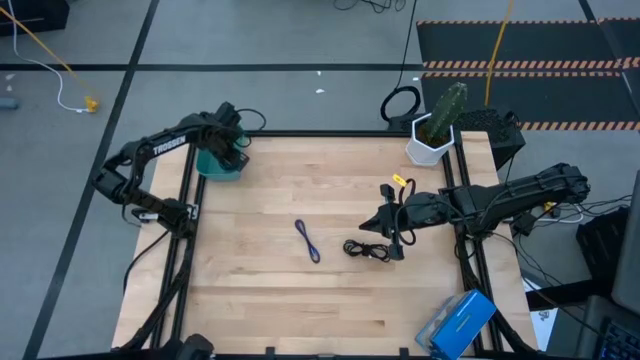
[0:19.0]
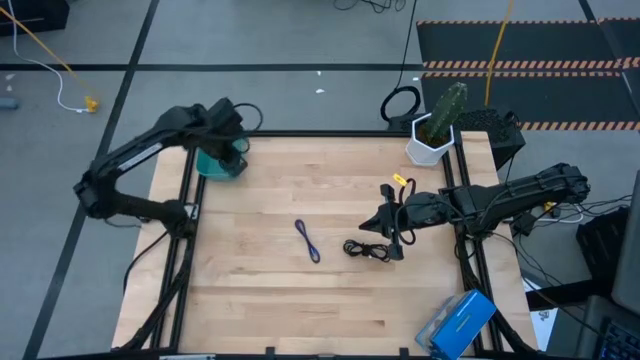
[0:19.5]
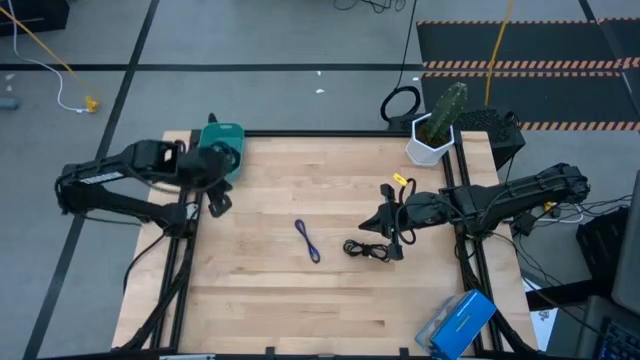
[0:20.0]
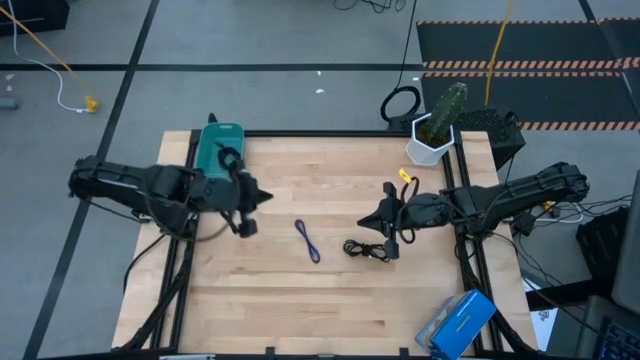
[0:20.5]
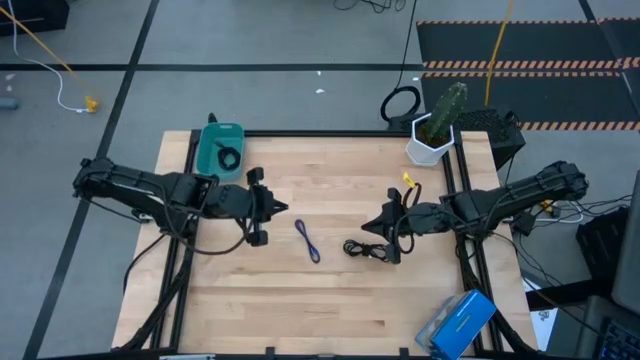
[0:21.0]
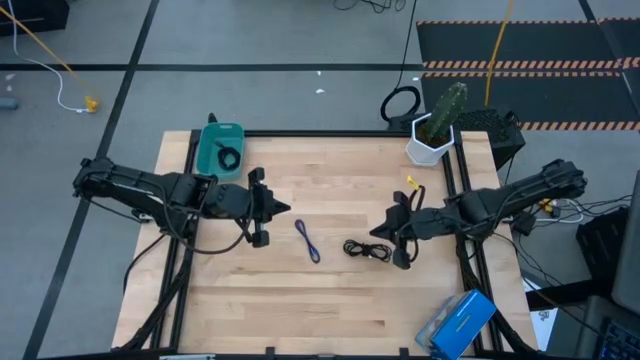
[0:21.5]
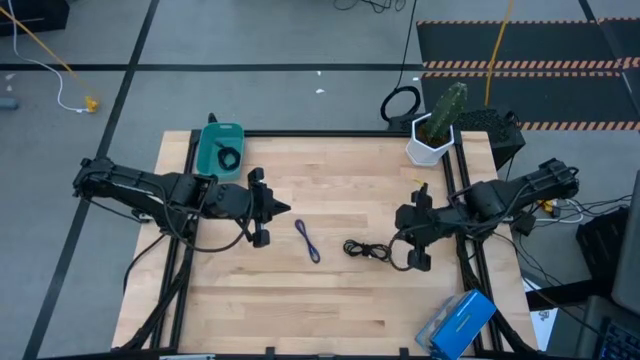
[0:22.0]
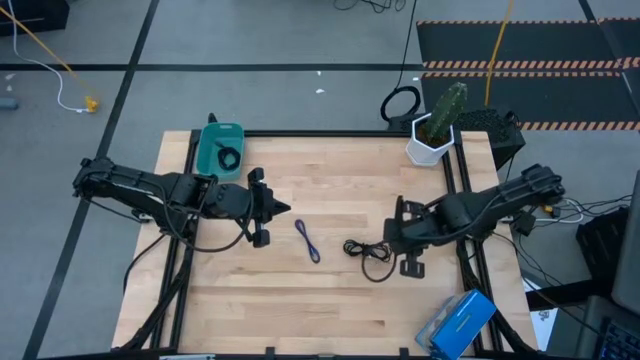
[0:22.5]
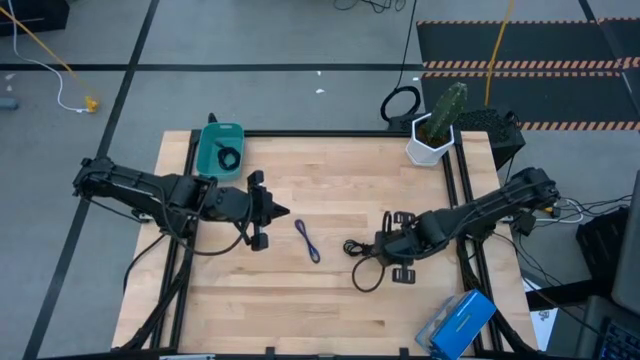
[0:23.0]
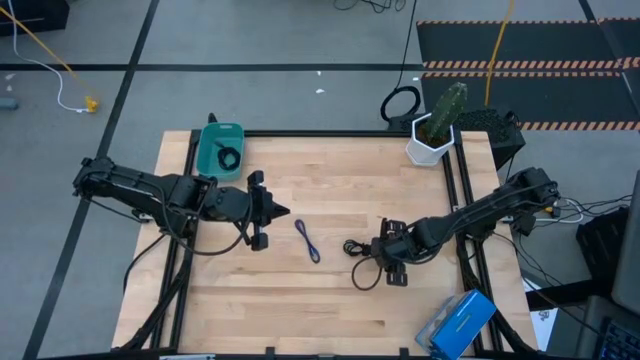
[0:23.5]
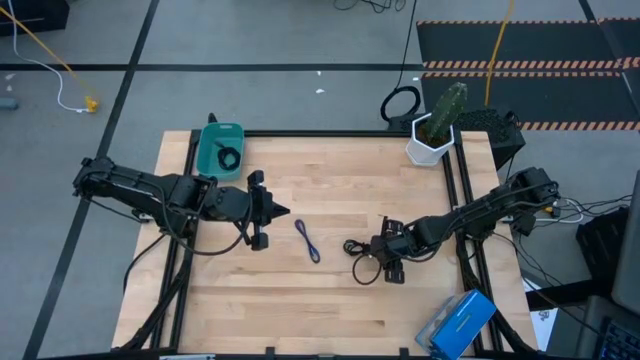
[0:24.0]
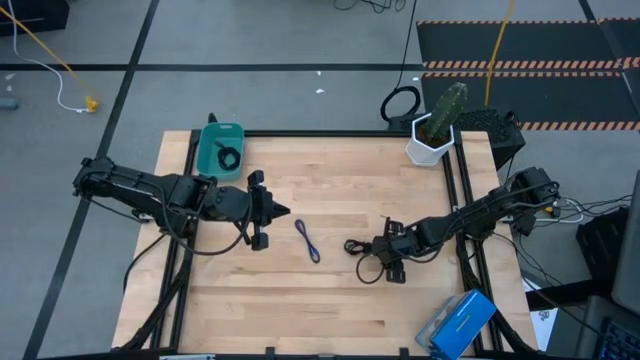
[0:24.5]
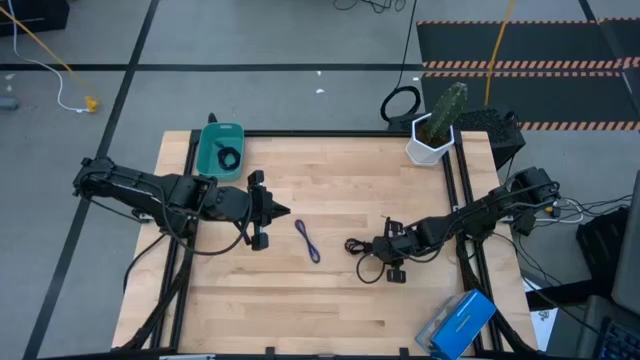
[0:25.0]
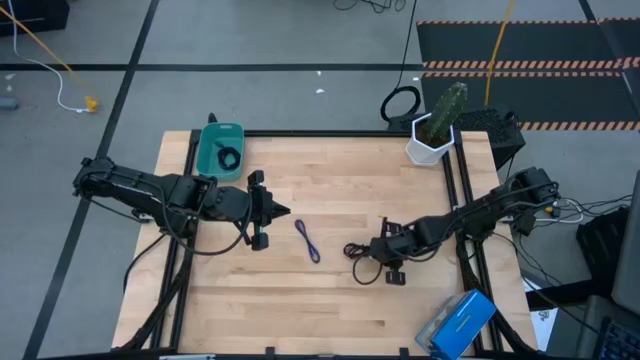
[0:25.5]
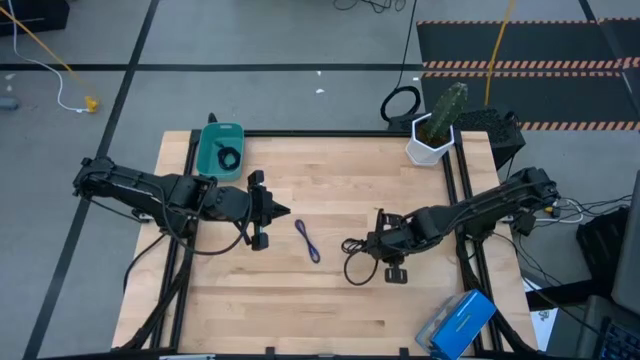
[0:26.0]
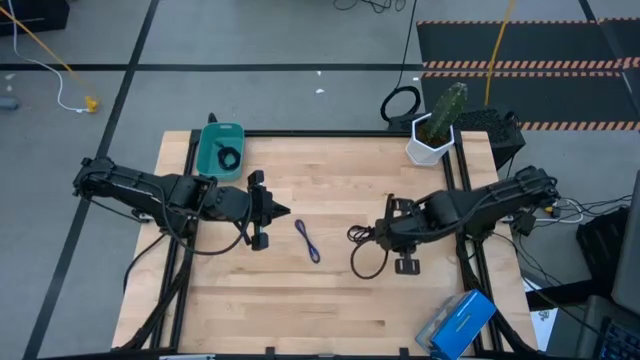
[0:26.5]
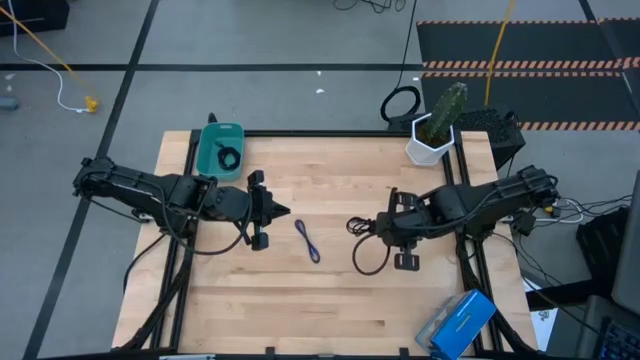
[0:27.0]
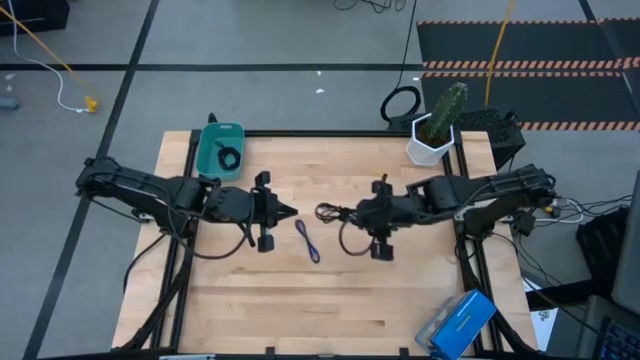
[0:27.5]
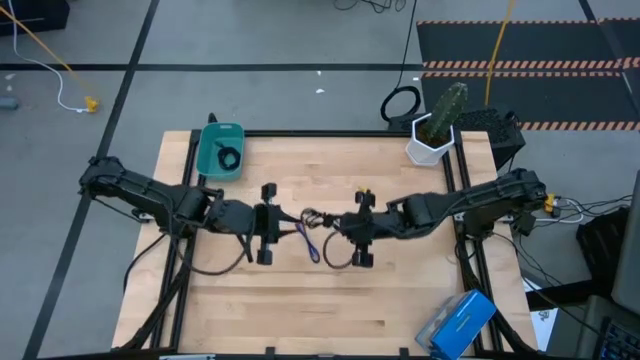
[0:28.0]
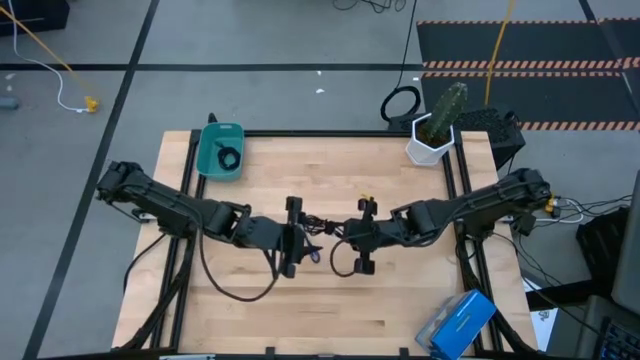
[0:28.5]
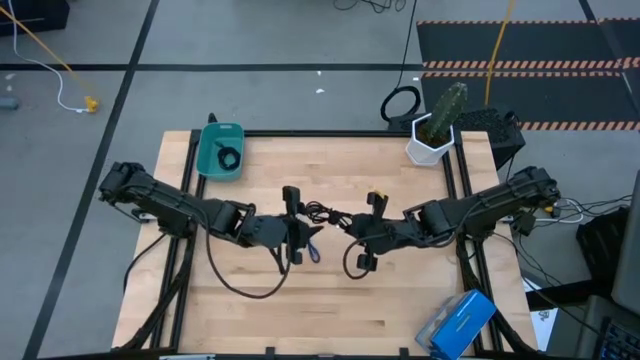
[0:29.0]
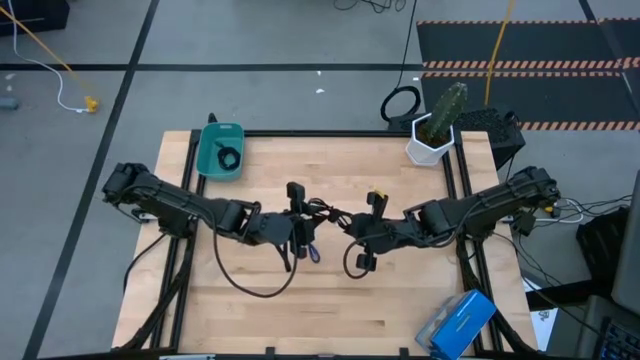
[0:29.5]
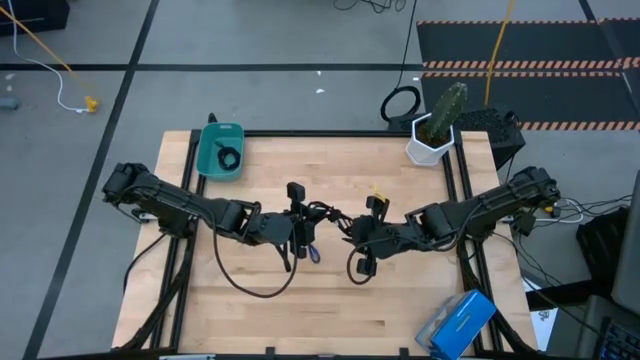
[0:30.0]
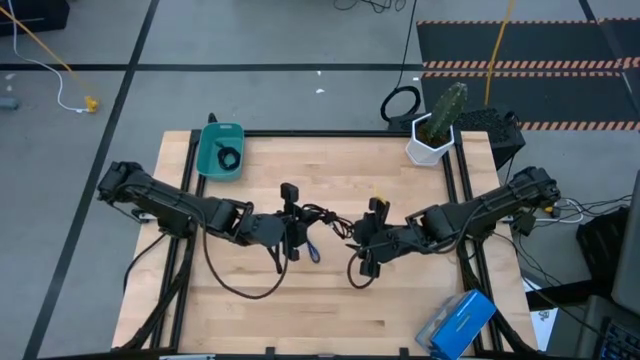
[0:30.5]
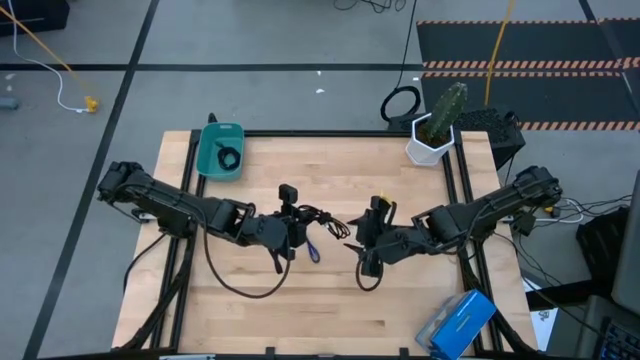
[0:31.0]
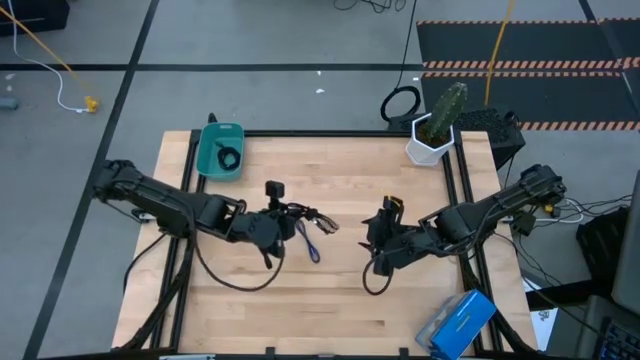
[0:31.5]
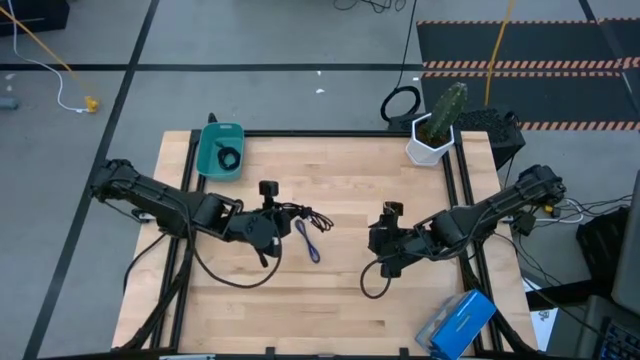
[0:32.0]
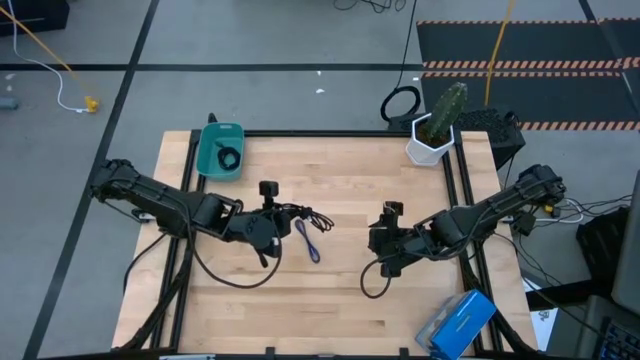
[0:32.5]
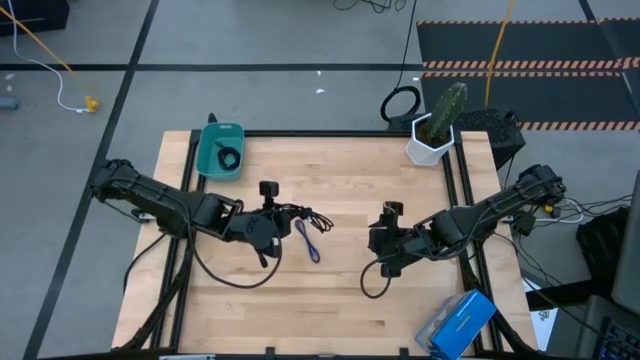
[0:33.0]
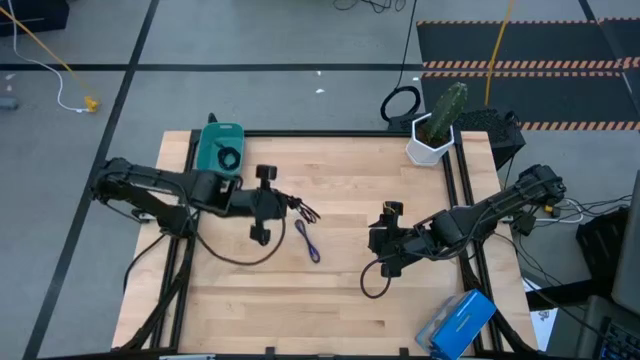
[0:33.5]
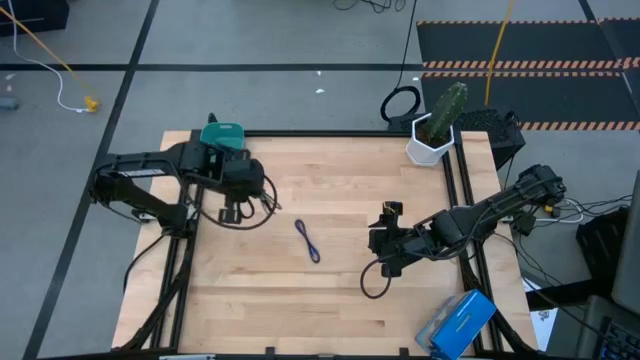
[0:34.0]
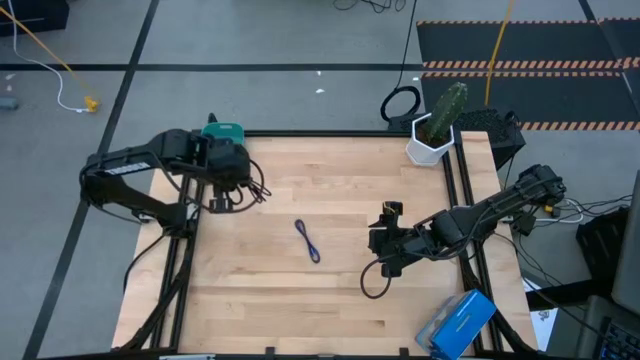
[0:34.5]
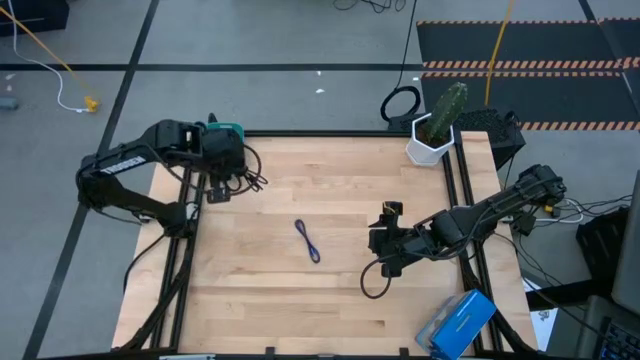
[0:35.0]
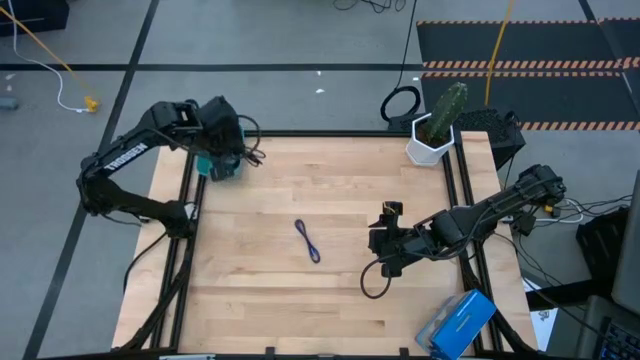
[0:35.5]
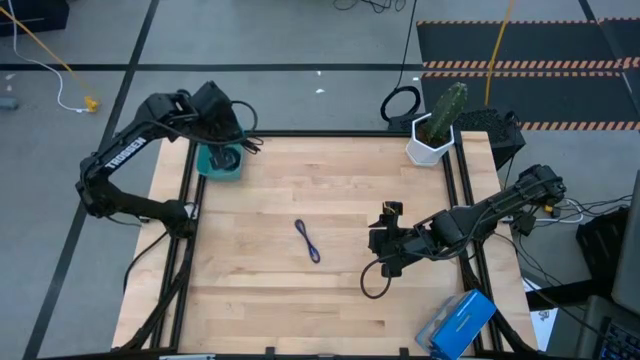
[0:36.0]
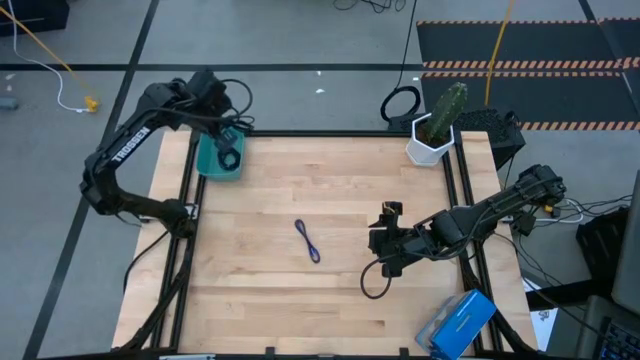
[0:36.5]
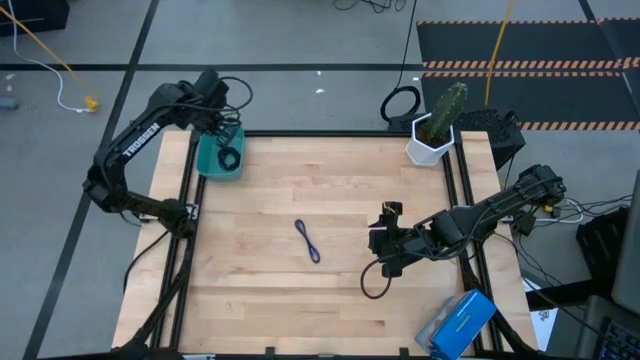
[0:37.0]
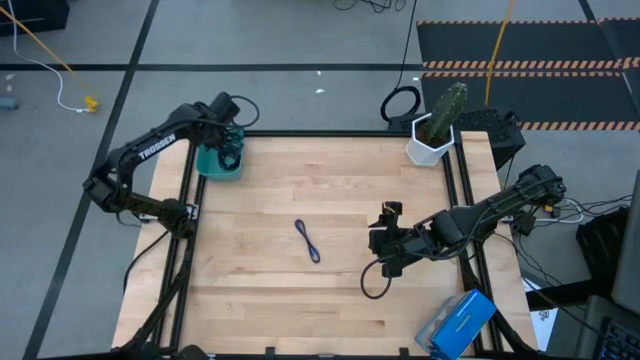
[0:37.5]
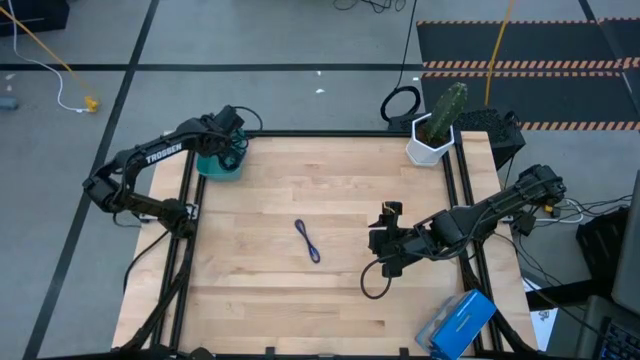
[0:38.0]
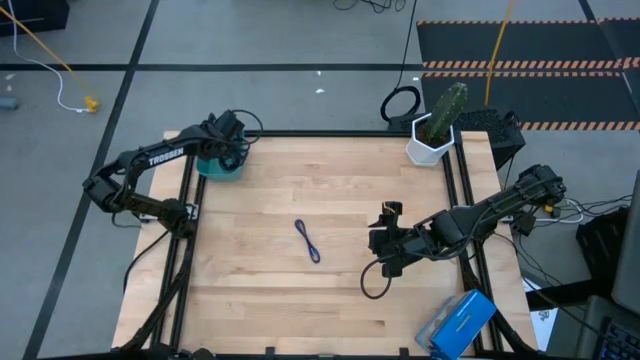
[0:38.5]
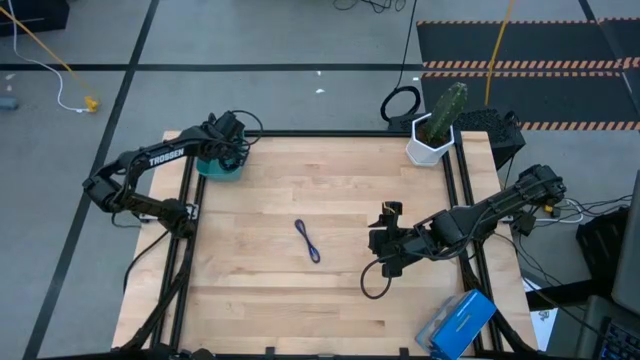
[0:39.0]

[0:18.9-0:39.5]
Task: Pick and place USB-C Cables
Put the black USB cable into the blue bin
